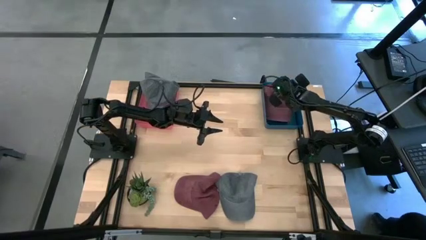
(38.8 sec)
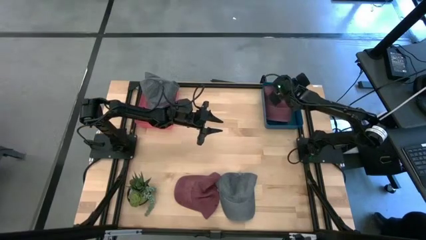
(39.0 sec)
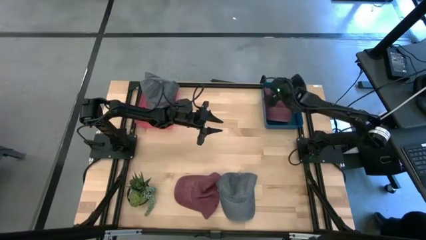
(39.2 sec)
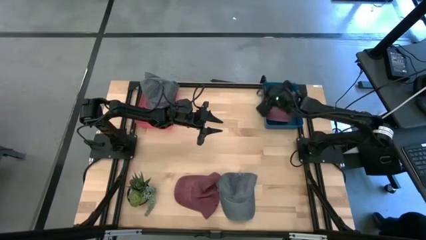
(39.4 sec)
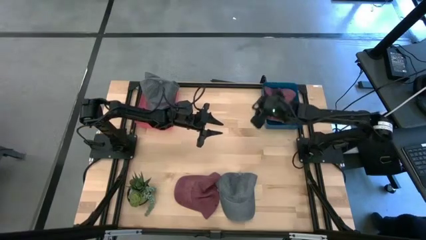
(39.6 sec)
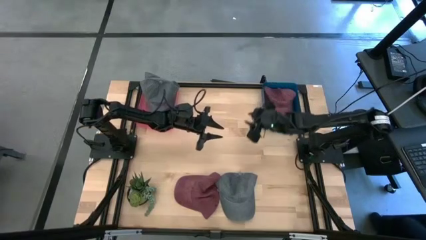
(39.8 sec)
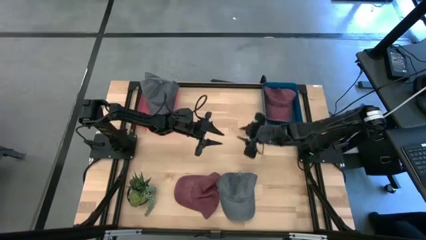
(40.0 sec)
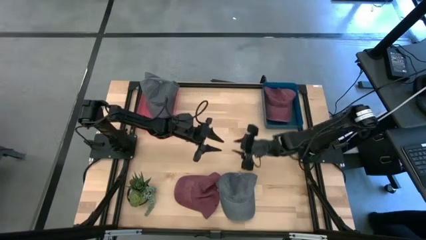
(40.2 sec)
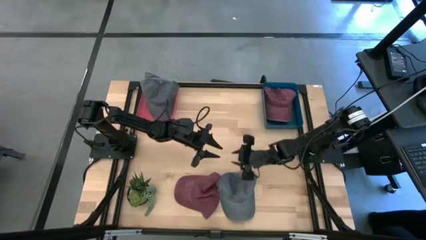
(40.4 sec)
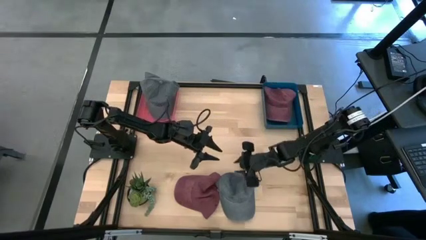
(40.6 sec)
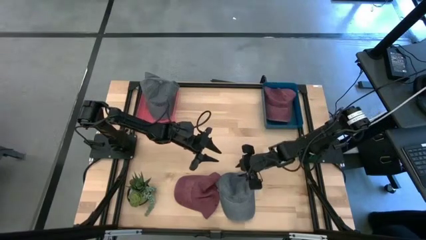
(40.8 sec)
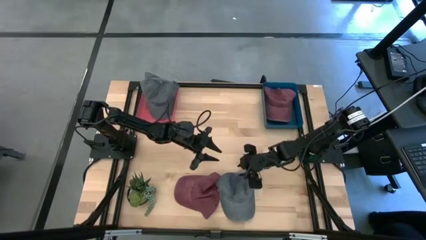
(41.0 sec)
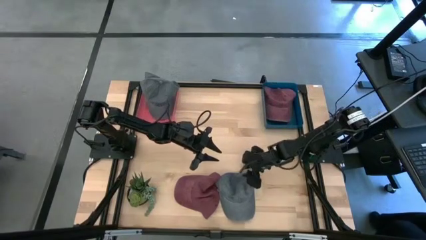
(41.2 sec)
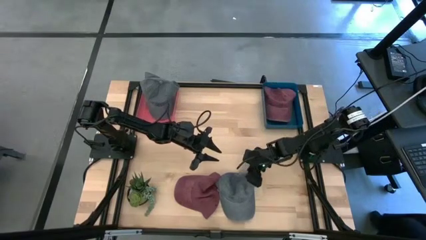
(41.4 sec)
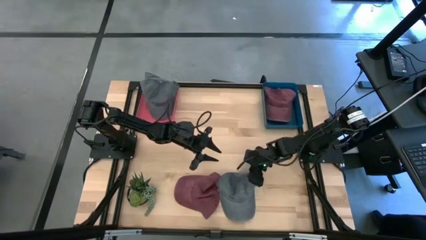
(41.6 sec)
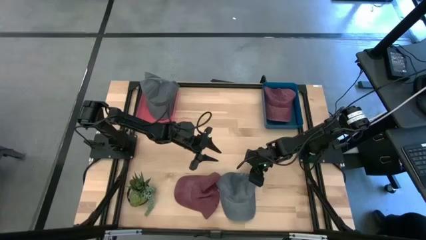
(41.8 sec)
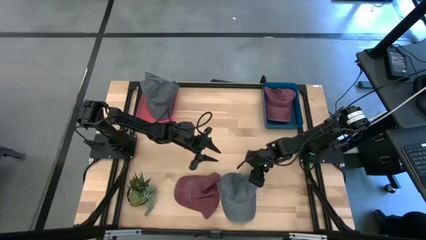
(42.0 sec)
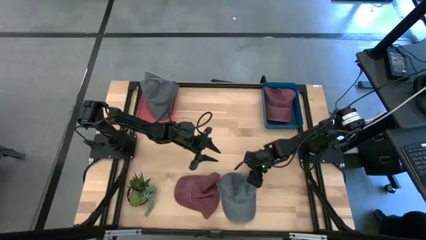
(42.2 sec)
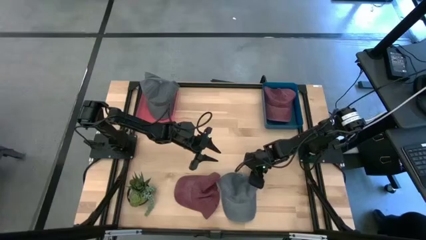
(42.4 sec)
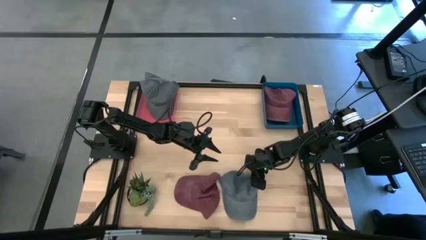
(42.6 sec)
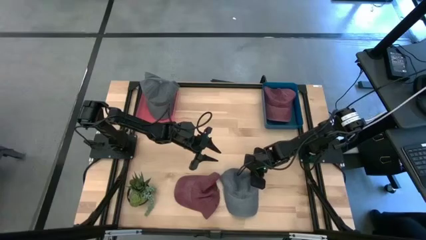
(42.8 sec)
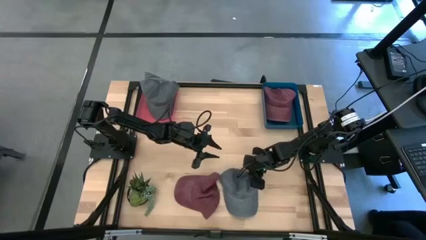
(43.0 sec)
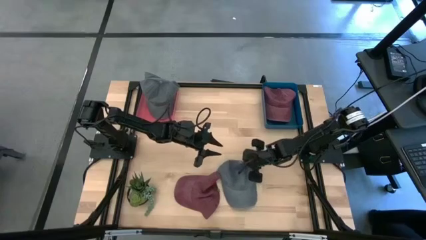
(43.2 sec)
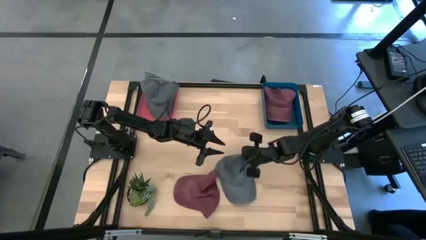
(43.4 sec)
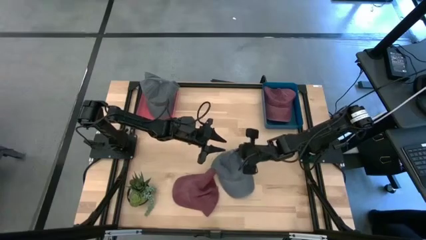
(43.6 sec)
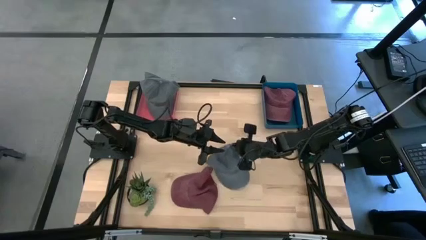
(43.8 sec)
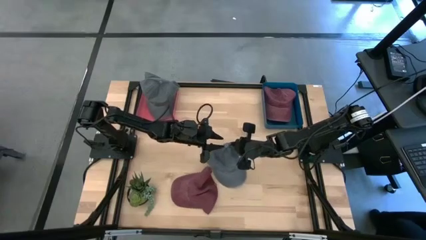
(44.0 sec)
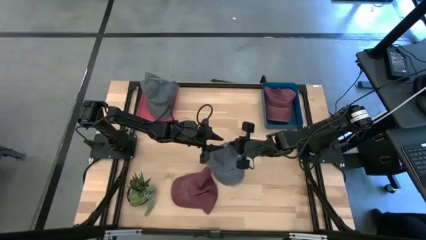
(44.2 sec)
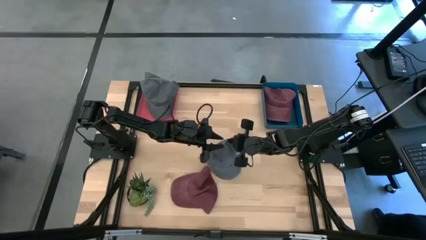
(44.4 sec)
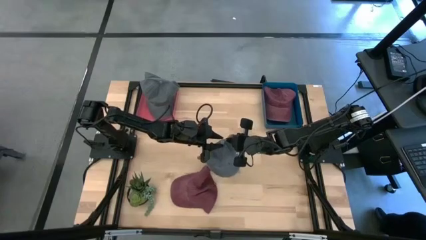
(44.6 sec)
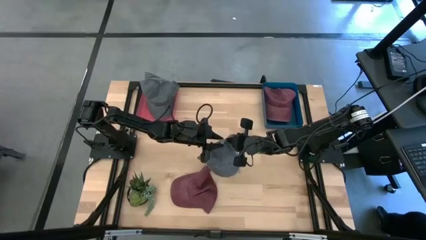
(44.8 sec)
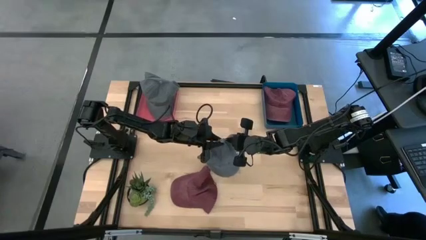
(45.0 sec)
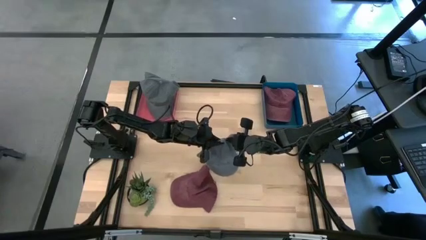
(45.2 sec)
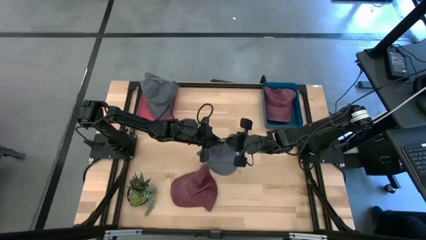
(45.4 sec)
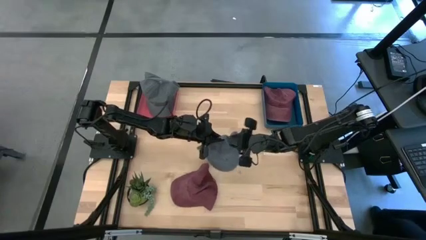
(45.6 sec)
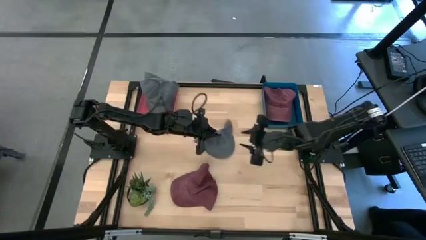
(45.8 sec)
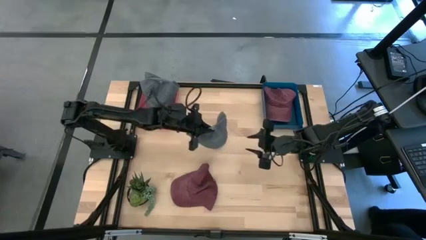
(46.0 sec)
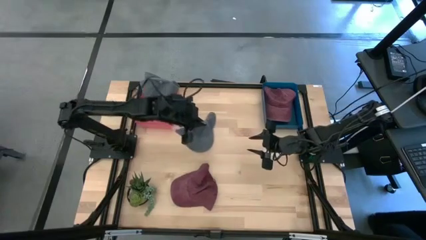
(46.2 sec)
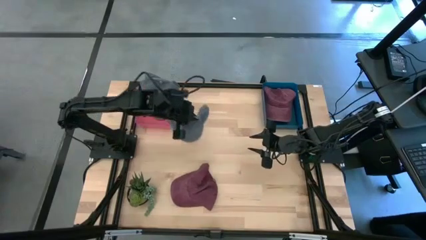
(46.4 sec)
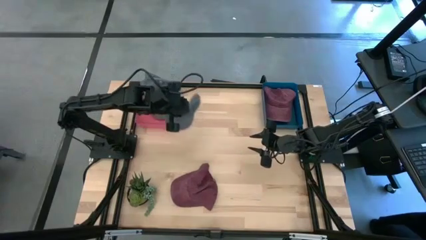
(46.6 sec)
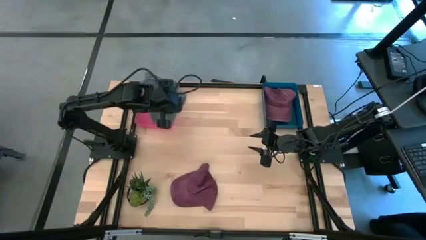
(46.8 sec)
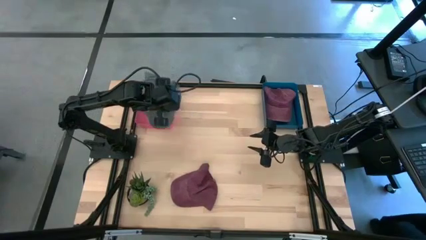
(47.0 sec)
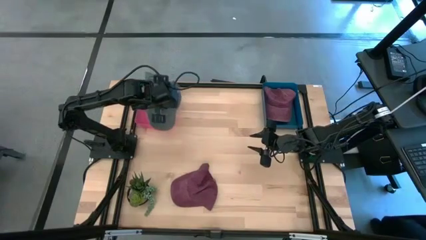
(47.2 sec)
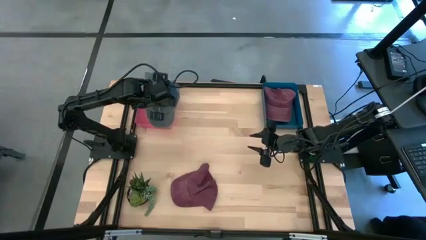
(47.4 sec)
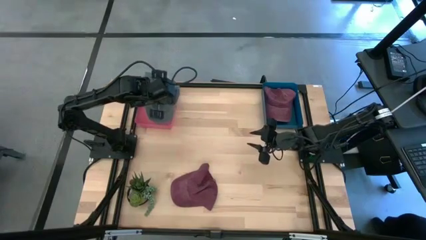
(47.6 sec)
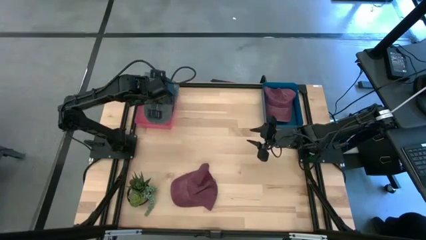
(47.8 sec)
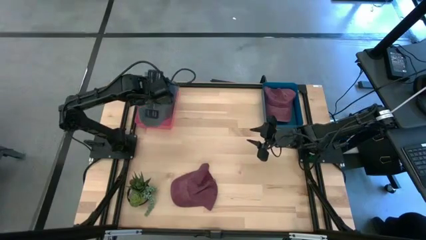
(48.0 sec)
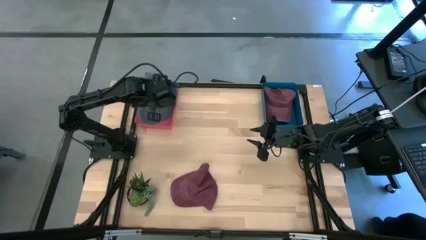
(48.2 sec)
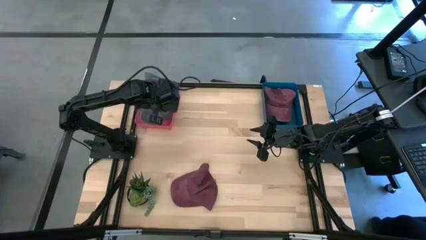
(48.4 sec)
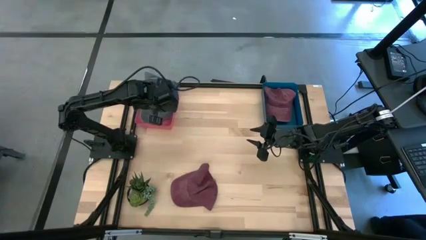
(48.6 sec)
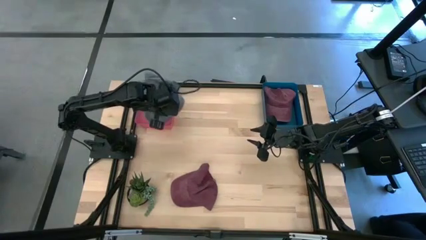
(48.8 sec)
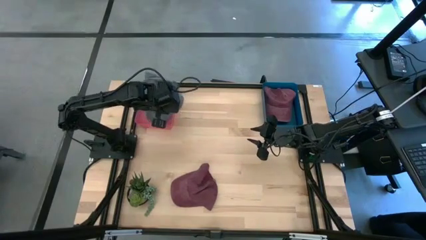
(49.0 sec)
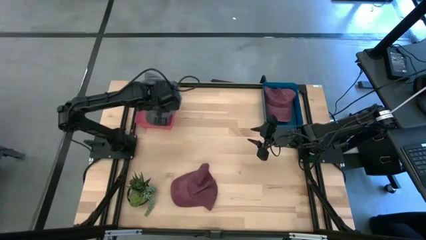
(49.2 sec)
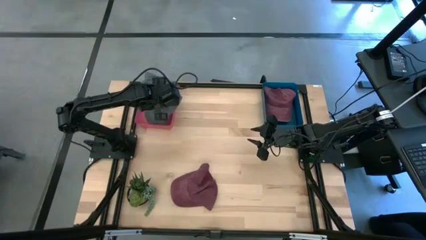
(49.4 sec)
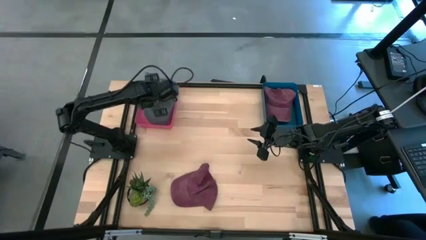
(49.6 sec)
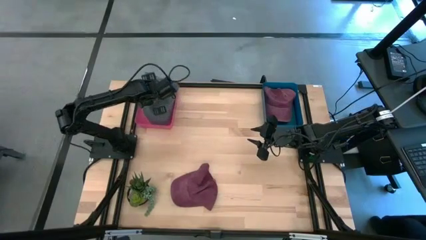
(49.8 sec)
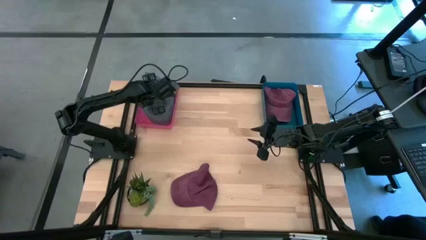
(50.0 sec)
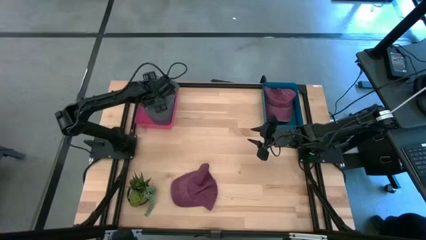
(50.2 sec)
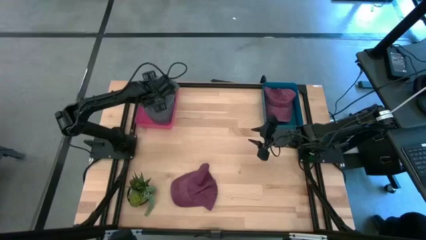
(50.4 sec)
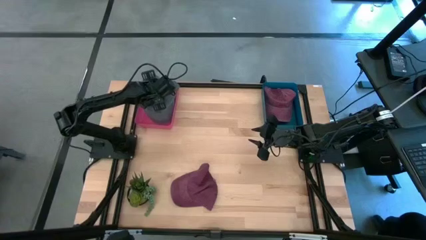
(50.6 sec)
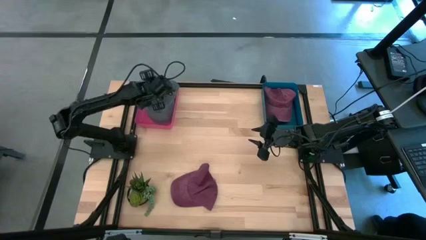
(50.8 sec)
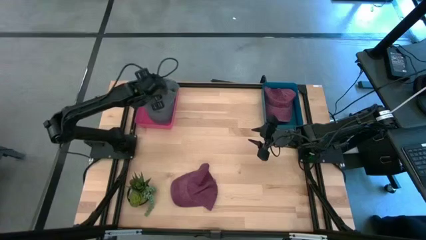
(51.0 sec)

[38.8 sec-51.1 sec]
Task: Pick & Place hat
Put the gray cap into the pink bin
